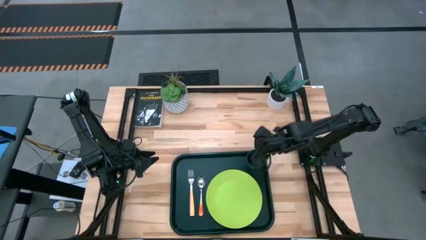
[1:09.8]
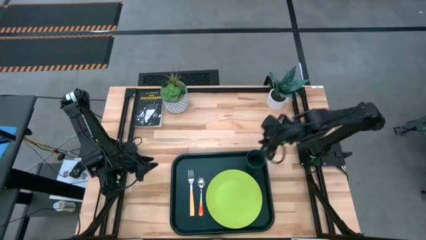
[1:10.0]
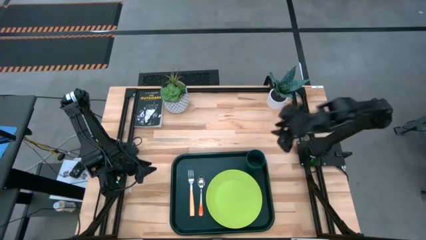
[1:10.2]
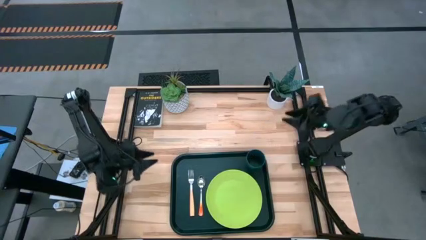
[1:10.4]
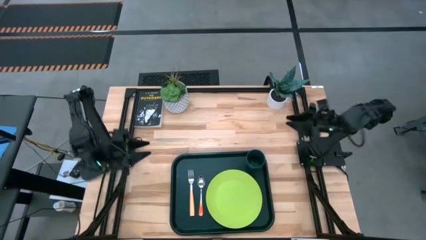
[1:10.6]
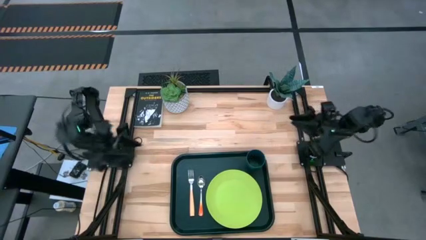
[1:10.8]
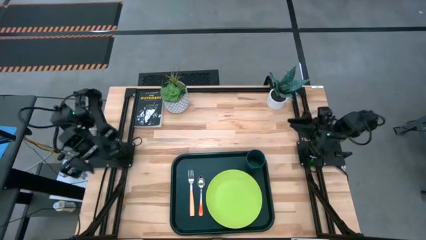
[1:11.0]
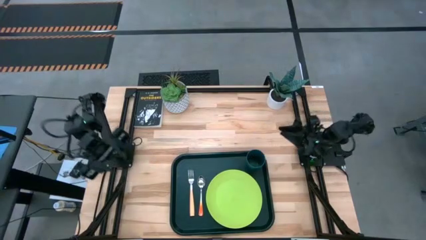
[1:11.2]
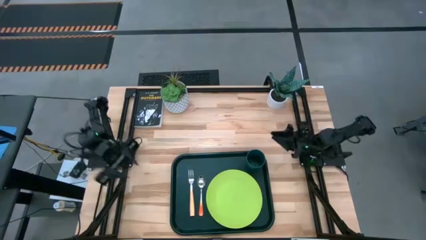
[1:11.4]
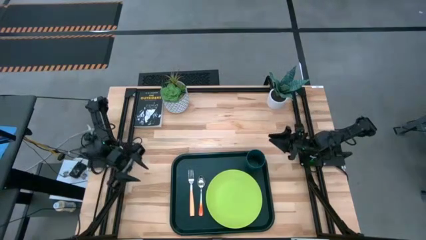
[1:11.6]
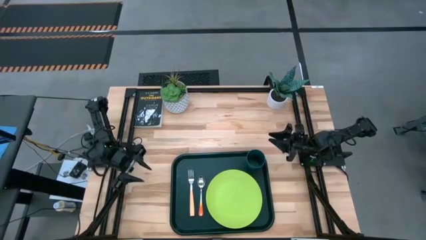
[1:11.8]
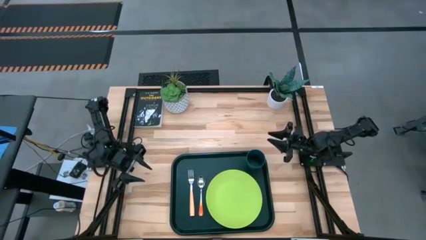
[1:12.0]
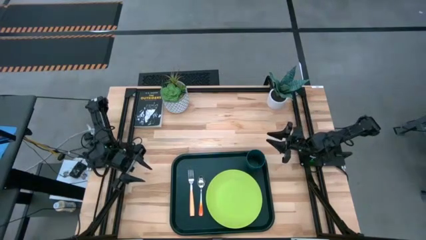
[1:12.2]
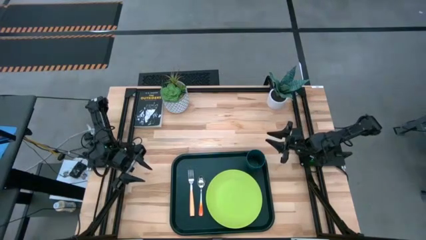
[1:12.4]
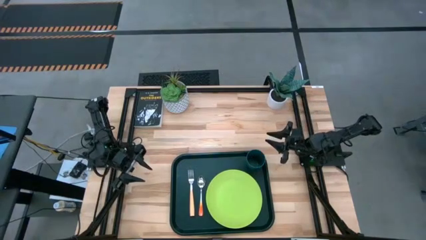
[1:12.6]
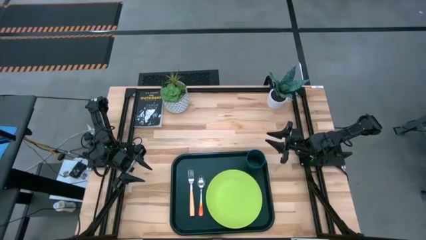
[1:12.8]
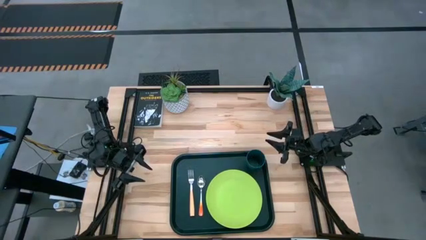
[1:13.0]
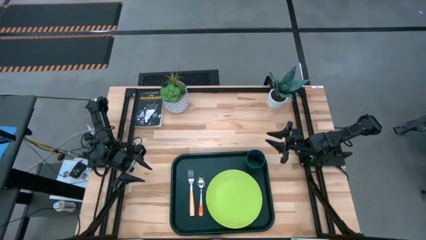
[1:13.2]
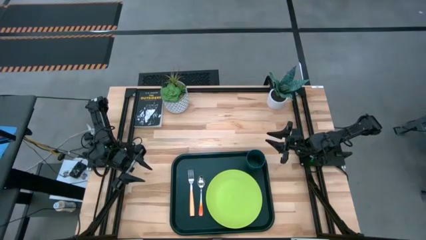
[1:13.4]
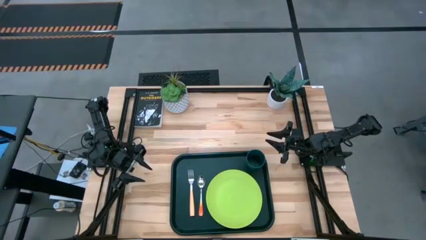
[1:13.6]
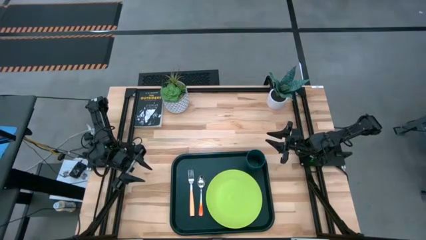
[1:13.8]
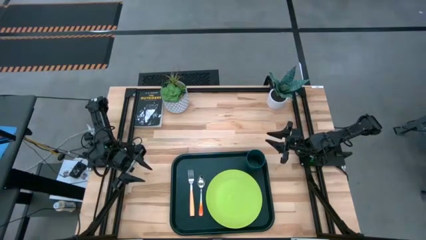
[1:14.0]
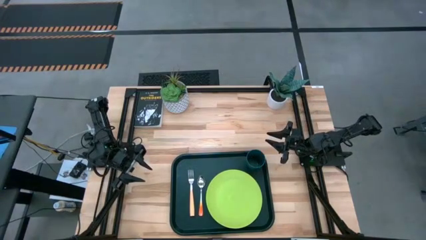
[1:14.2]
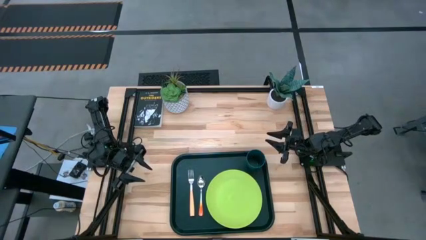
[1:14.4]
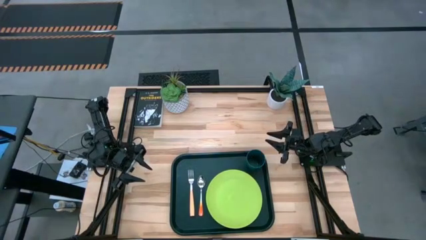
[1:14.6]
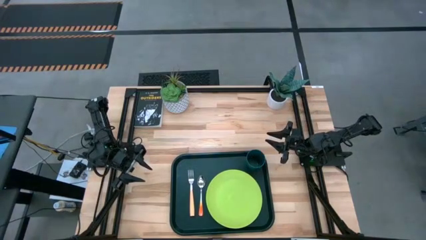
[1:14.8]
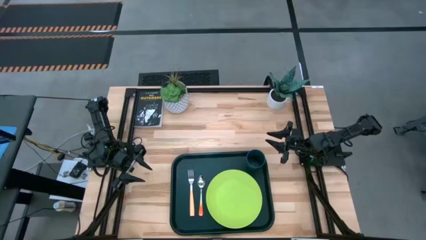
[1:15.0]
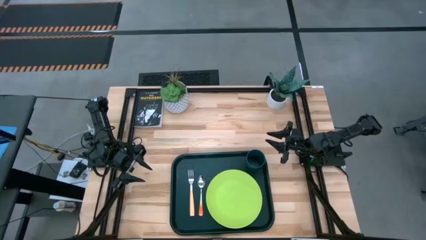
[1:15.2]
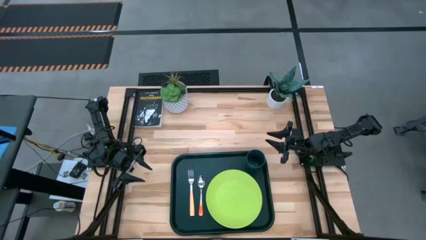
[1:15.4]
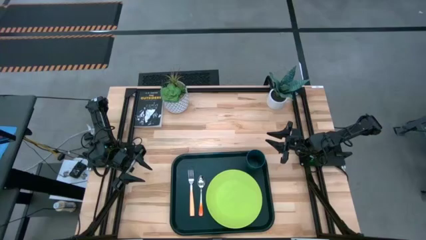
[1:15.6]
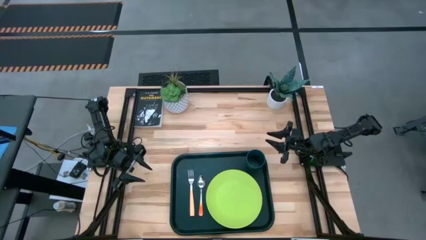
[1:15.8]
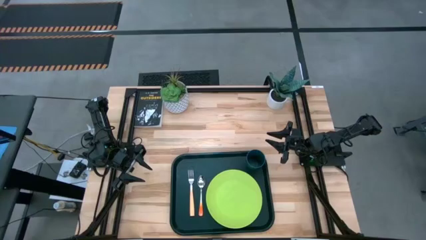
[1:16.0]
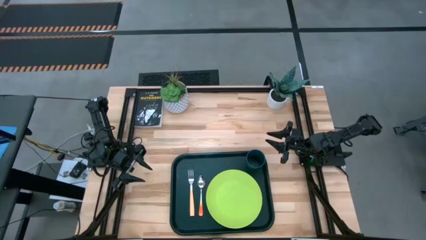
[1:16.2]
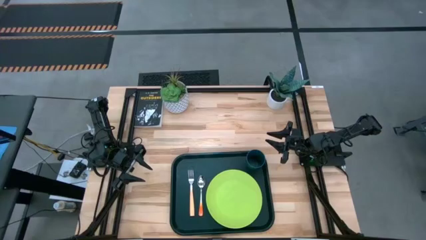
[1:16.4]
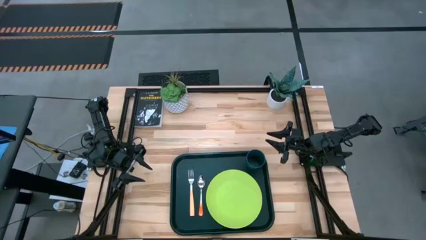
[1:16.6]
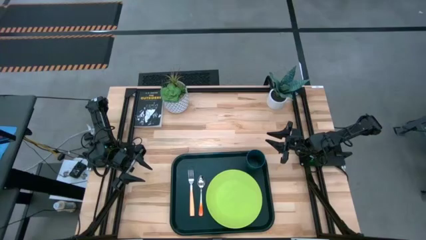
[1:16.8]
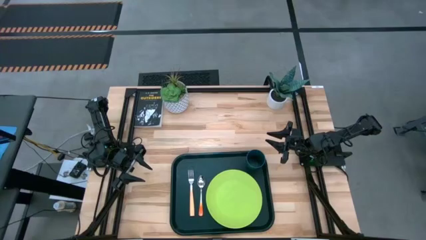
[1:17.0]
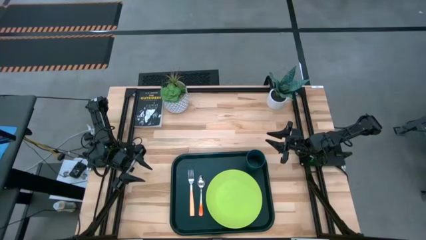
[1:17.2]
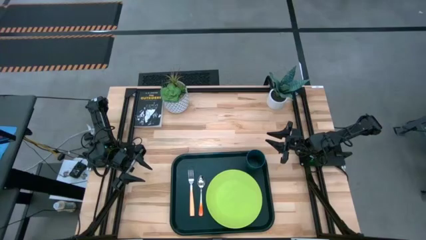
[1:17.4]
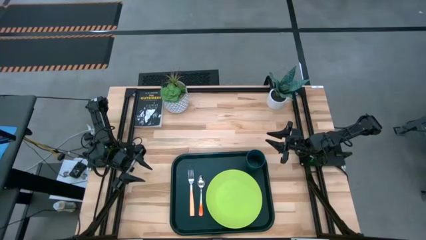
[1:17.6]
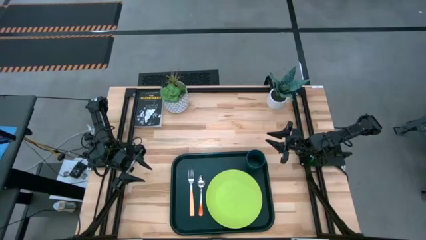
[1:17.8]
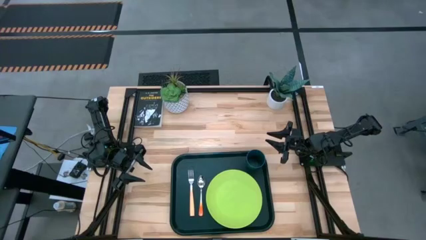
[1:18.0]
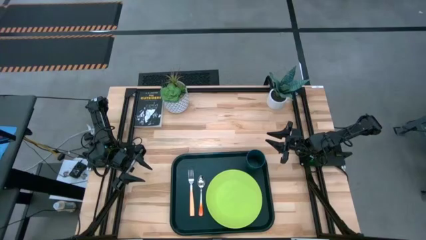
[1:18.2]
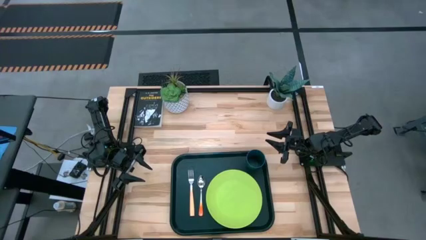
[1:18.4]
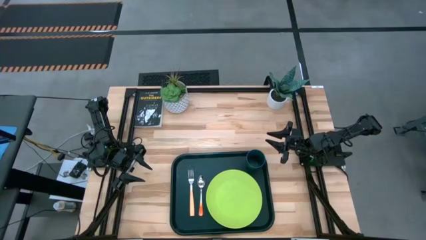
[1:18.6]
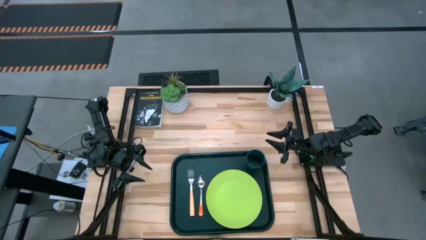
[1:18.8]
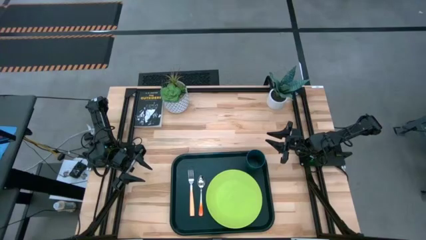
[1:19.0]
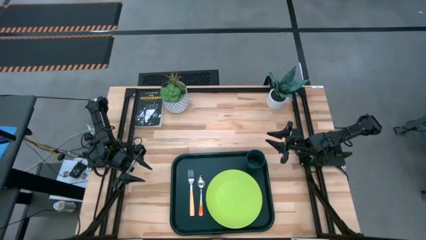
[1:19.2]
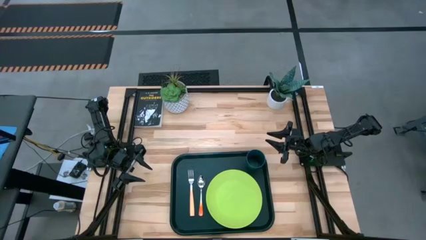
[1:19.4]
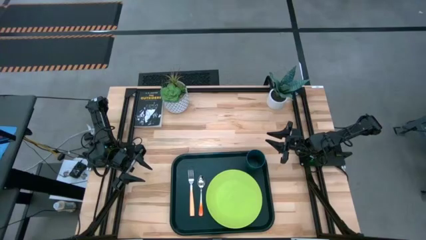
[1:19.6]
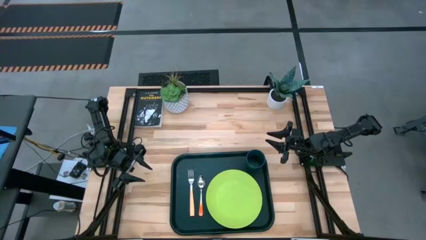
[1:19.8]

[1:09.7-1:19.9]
Task: Pick and place plate/cup/fork/spoon on tray
Return to Home Position
